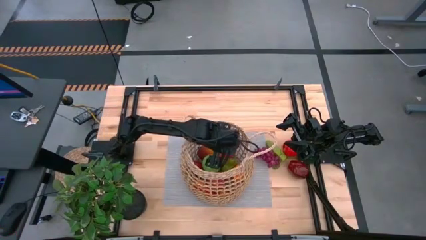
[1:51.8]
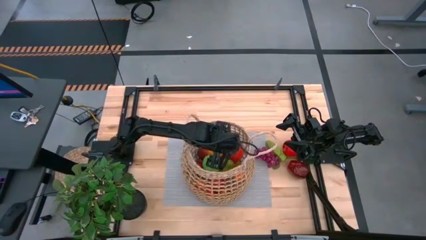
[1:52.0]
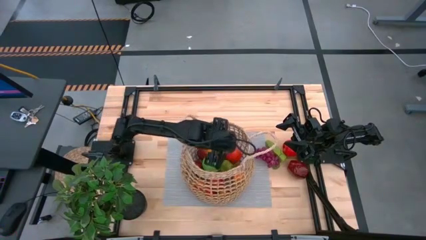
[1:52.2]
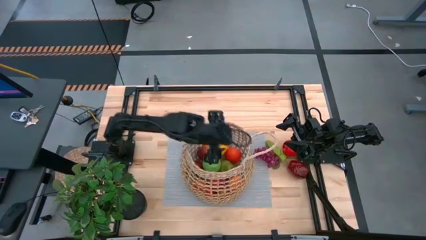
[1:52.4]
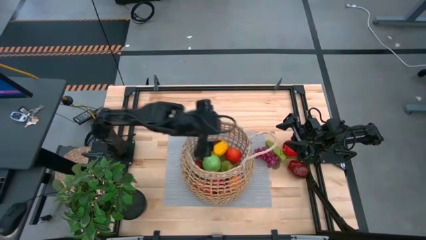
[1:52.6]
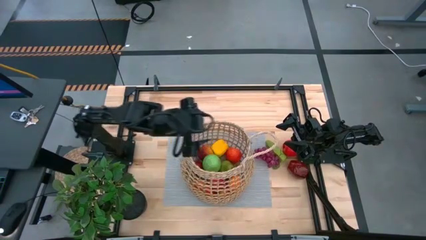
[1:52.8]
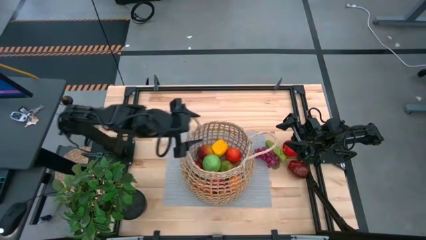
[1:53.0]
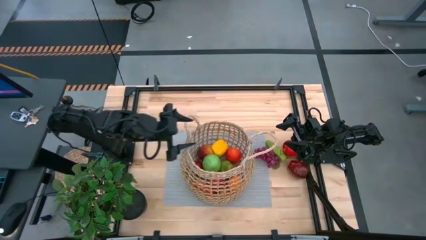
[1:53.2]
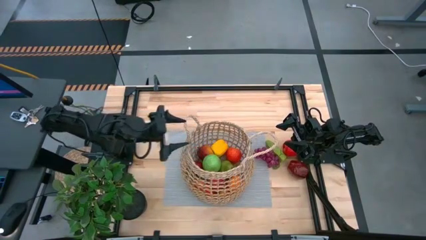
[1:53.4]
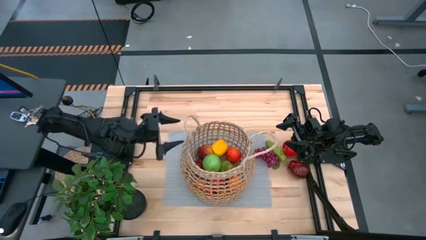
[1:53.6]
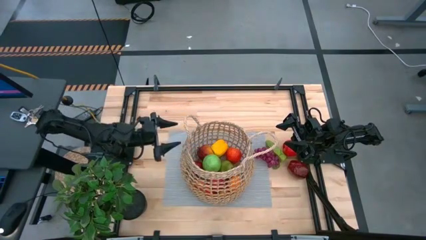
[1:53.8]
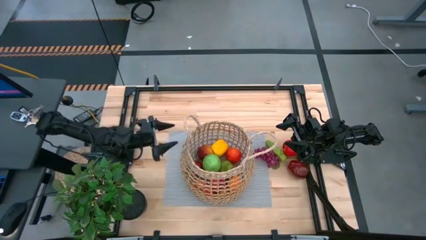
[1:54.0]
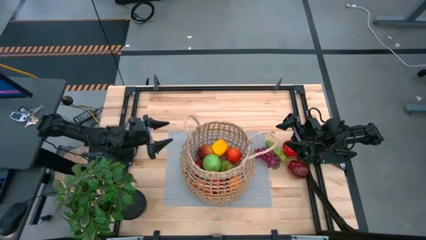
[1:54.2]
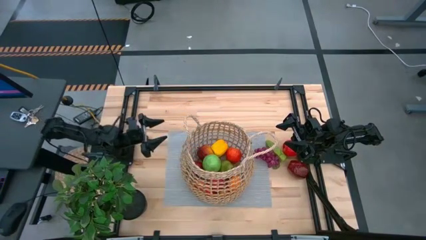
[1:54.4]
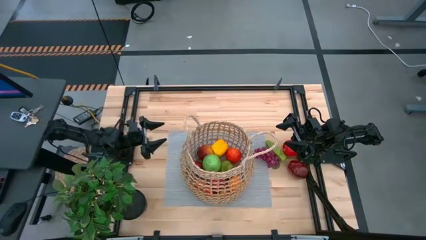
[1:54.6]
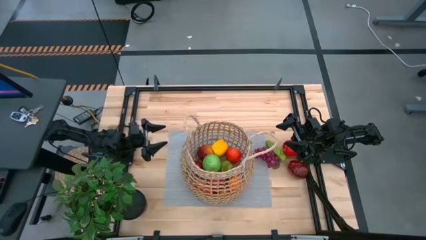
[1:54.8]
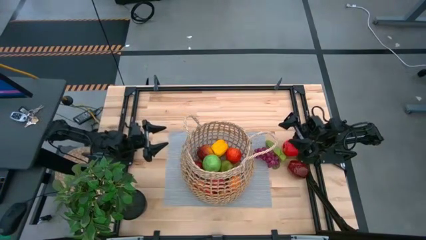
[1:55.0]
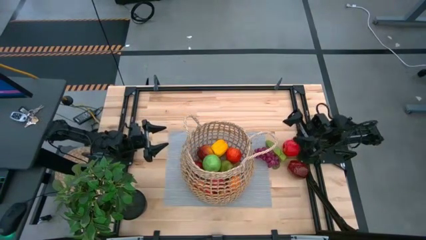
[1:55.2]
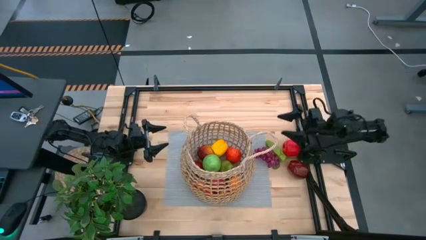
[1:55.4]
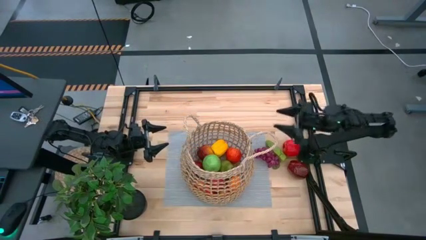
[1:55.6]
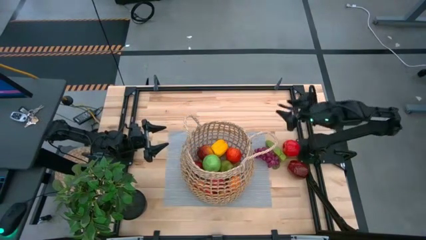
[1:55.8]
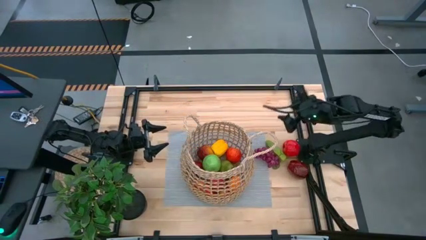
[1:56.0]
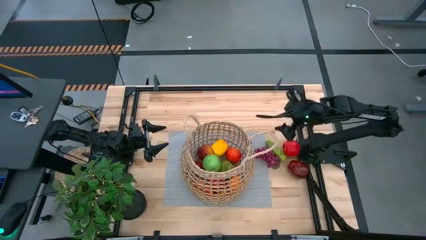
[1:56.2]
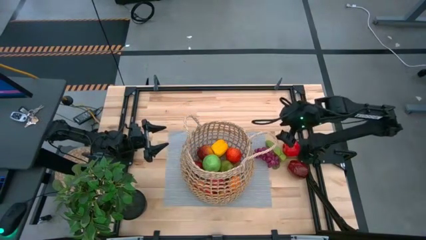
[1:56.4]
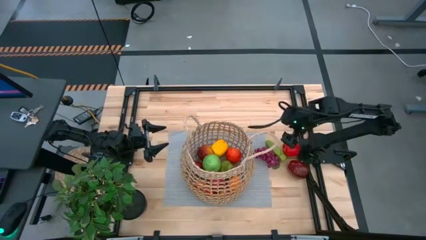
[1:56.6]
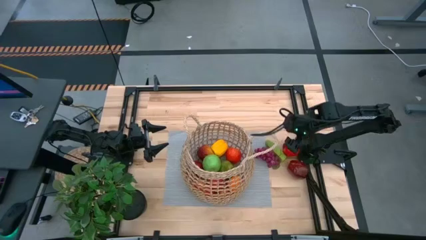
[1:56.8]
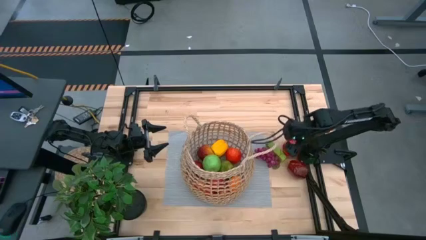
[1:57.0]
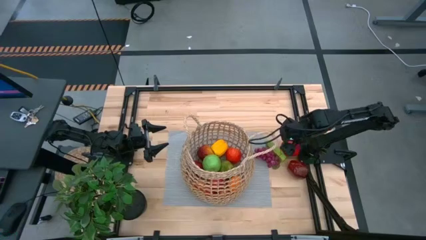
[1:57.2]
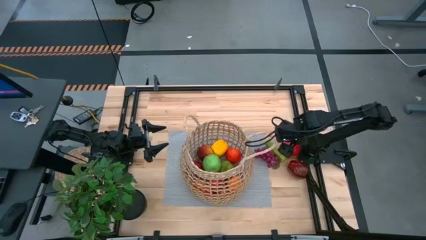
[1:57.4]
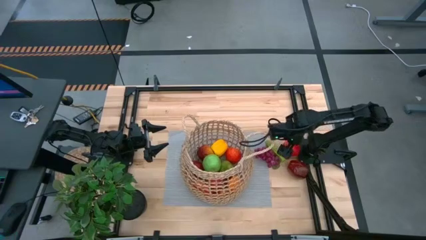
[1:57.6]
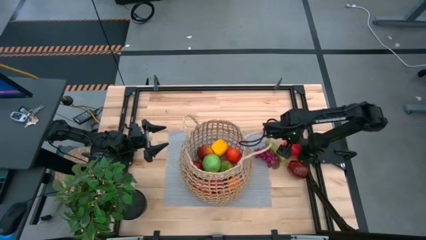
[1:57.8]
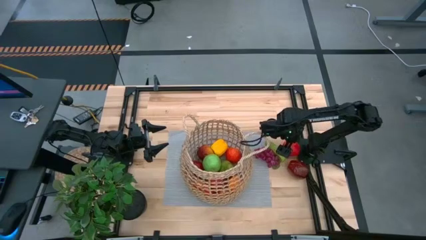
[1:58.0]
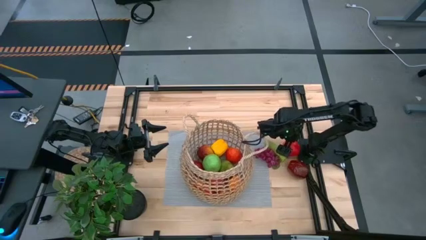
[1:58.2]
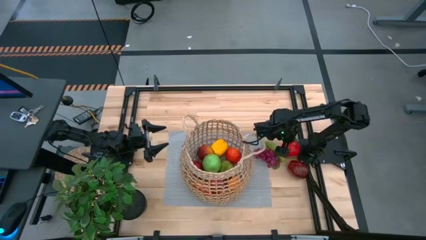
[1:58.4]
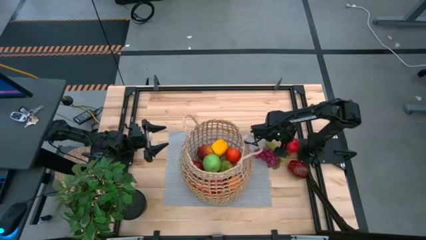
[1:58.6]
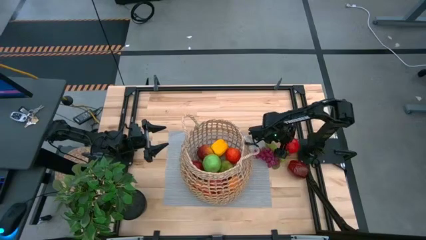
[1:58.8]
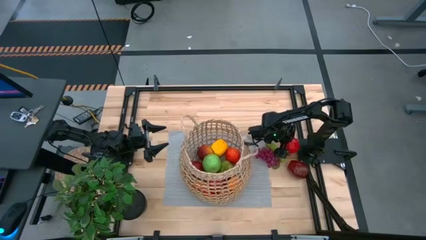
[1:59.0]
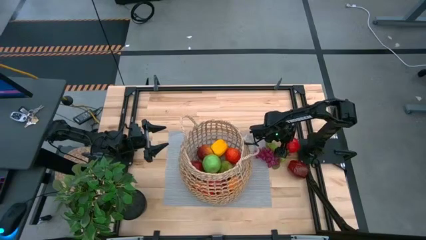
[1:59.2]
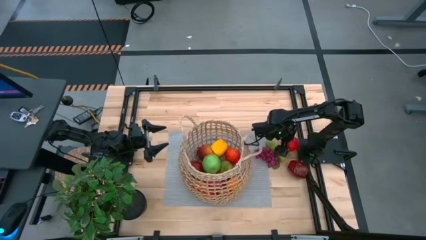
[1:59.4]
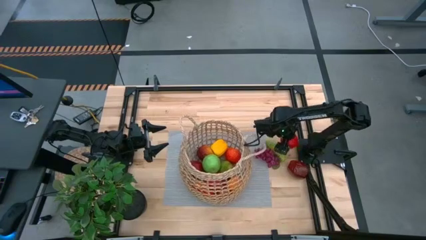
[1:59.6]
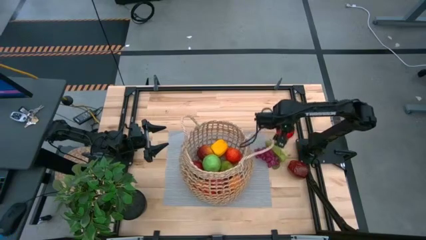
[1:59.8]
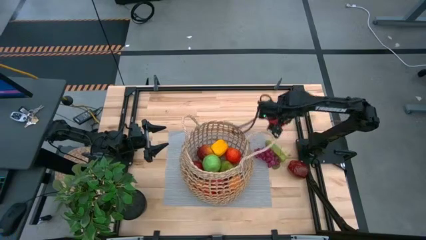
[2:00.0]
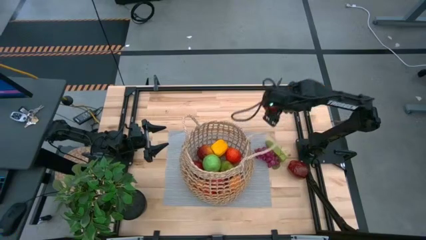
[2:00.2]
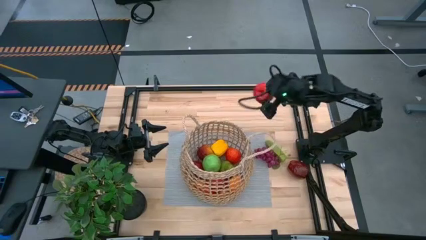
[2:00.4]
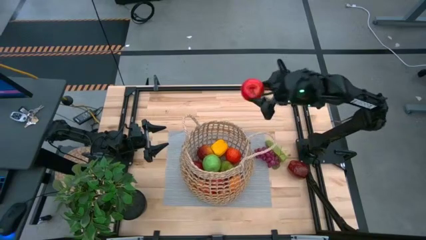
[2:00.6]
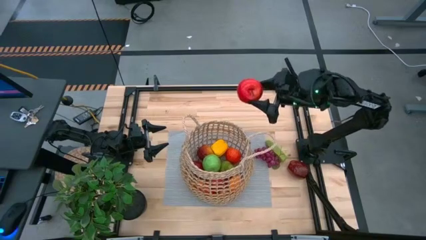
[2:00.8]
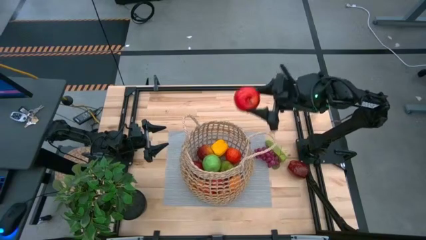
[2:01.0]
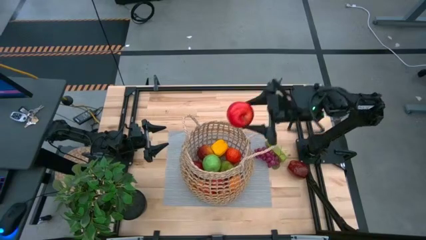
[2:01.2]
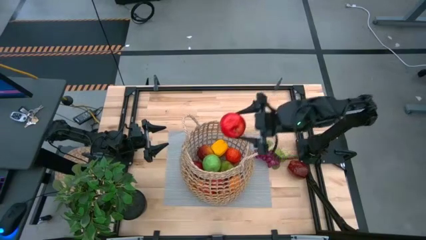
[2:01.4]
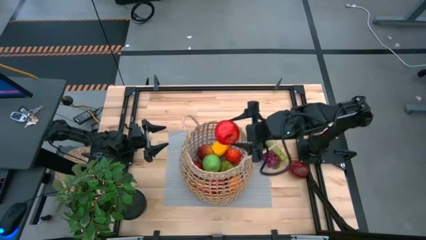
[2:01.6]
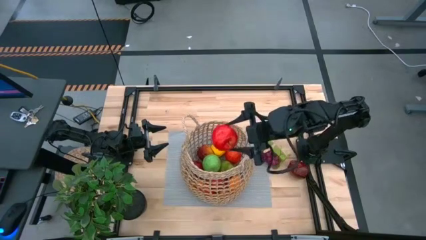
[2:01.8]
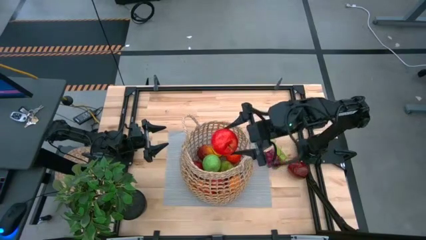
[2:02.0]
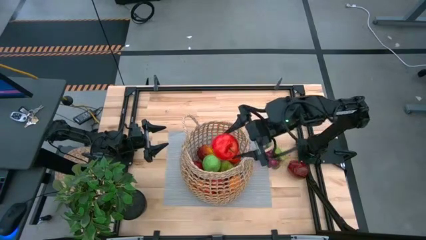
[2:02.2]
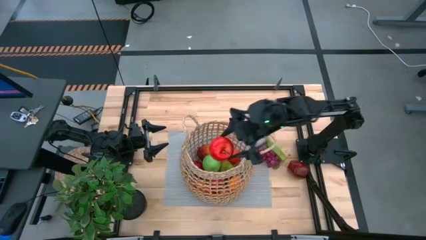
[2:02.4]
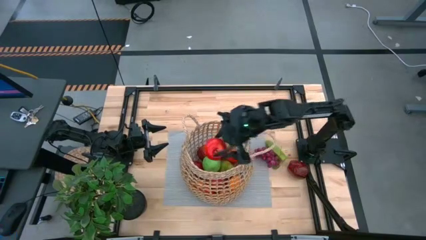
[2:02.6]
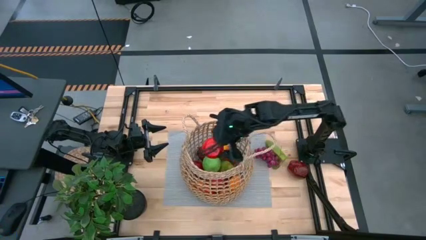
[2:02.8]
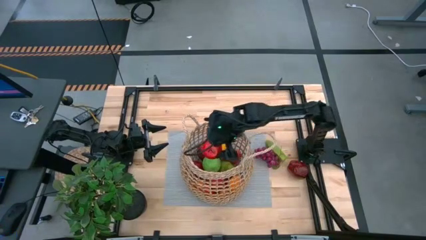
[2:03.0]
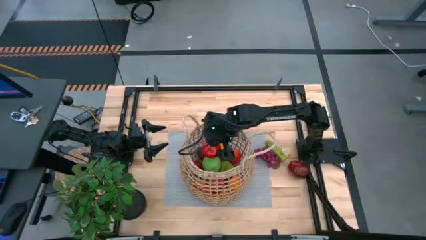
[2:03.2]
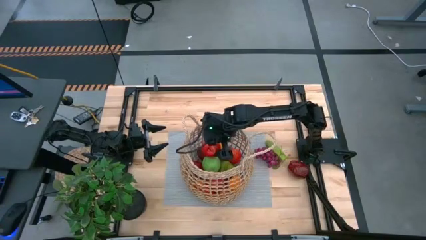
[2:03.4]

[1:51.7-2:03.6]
Task: Build produce basket
Put the red apple into the brown basket

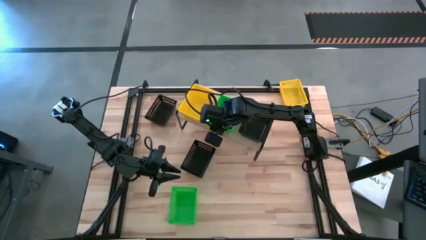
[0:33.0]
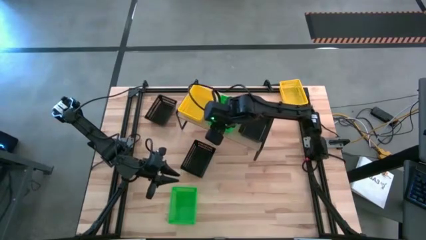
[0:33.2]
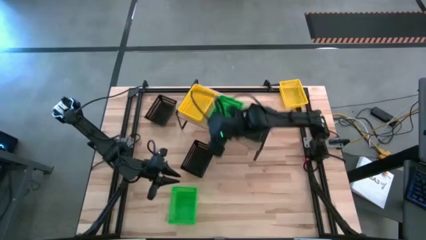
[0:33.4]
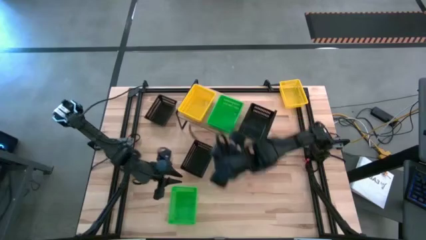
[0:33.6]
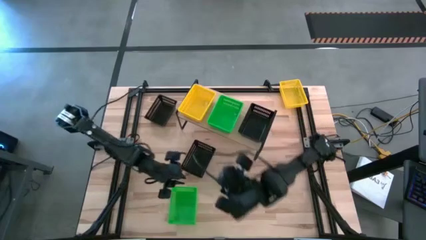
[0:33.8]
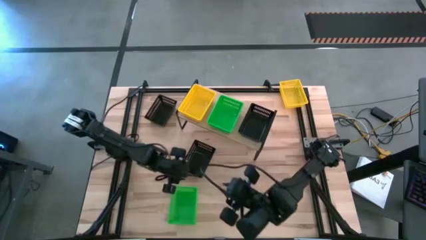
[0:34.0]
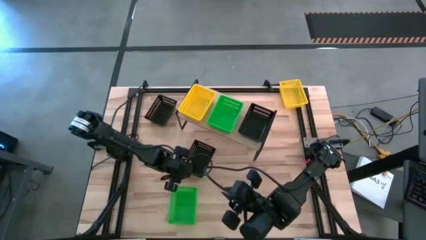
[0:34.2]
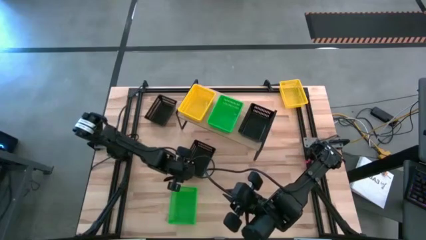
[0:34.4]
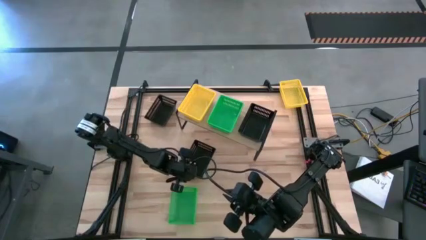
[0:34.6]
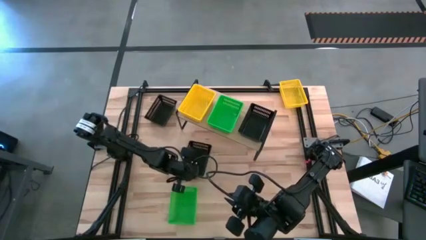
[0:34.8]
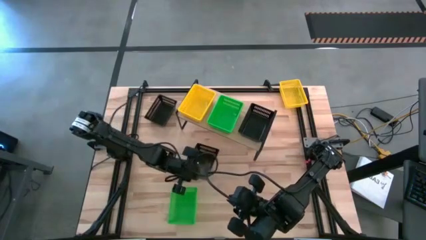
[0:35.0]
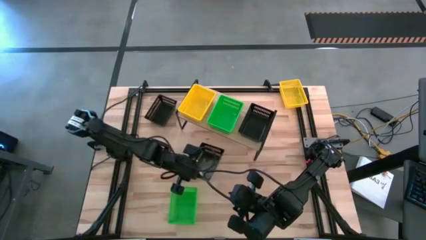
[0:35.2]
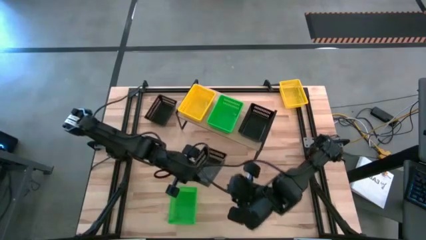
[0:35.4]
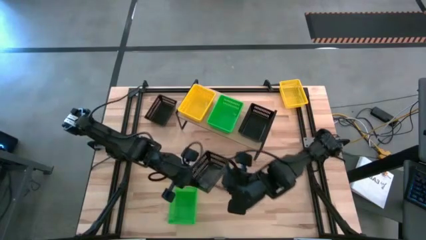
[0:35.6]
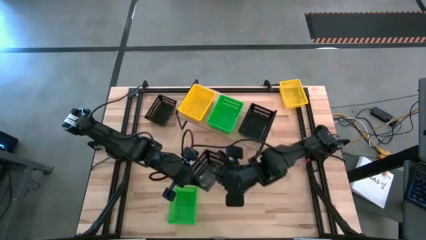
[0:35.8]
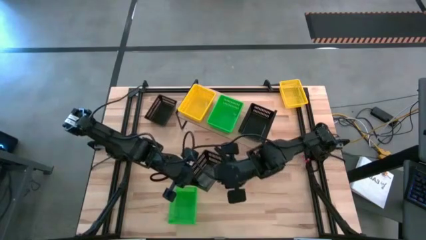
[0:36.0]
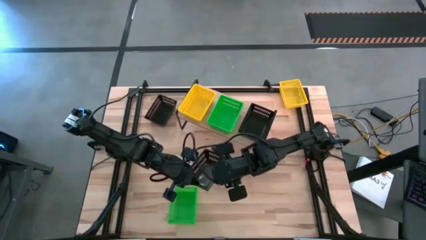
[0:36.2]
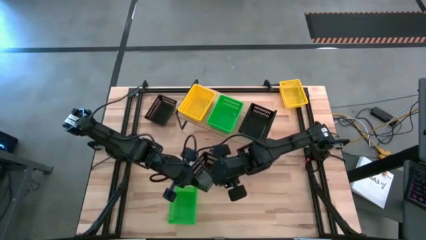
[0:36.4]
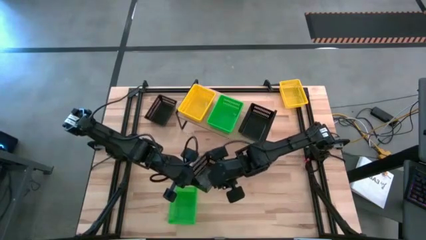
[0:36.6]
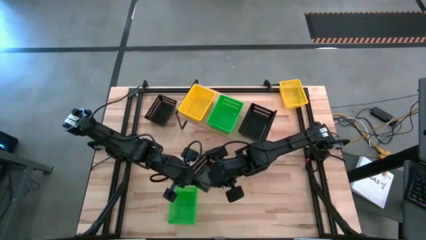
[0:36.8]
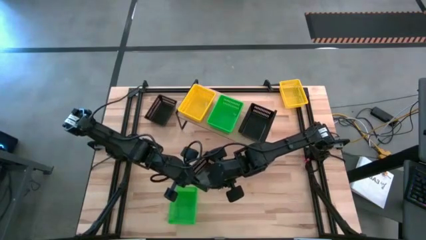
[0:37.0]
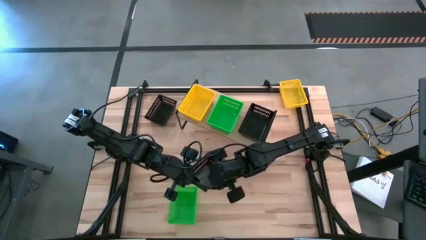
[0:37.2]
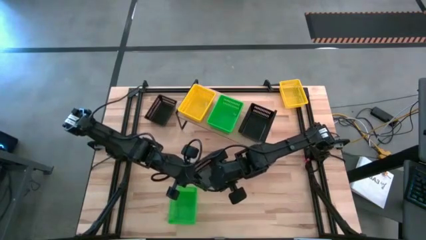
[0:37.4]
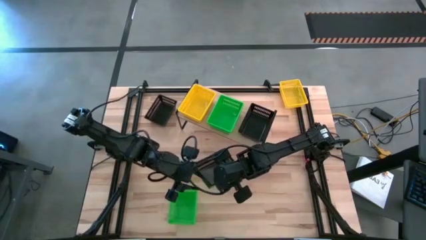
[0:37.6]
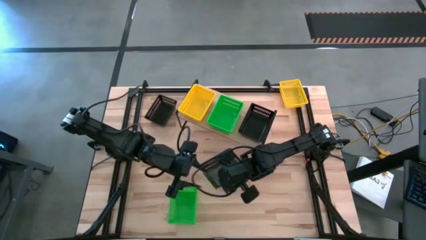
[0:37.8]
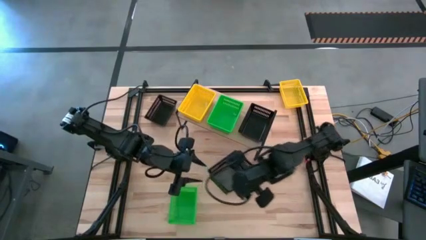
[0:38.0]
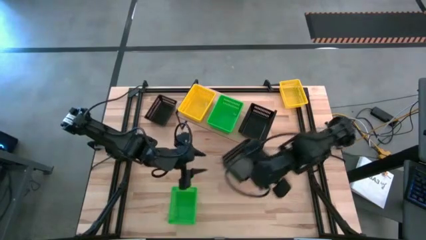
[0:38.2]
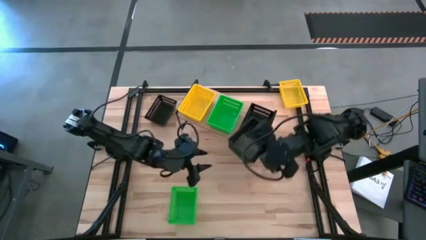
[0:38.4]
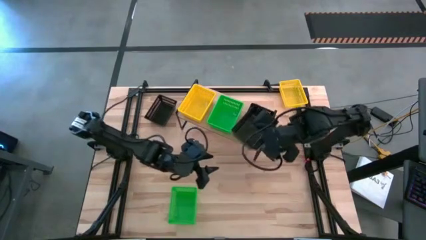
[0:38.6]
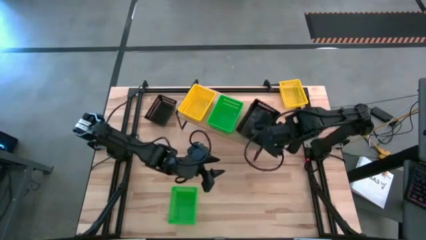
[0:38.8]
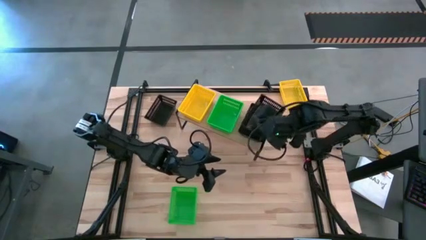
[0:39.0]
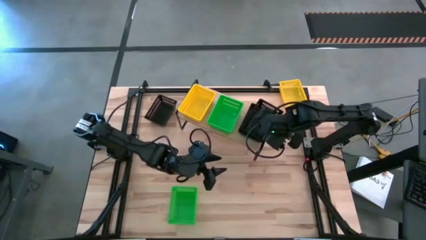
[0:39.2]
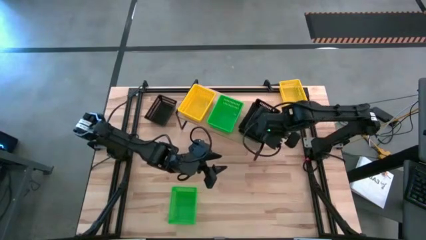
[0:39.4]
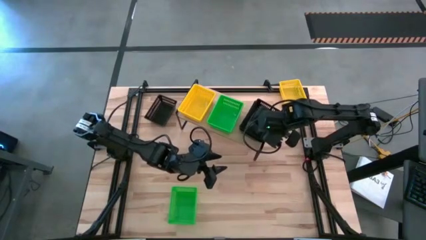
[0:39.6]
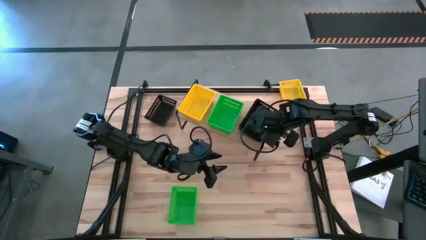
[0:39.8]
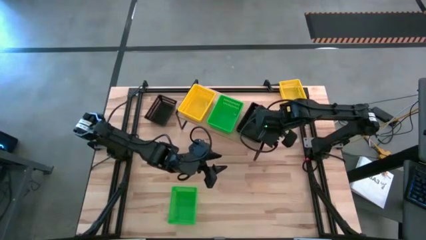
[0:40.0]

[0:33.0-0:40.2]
Task: Stack baskets on shelf by color
Stack the bottom black bin on top of the black bin
